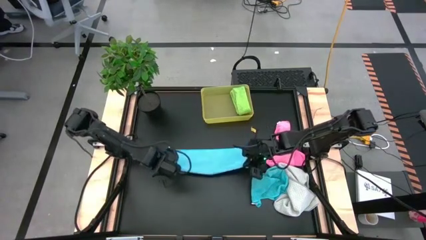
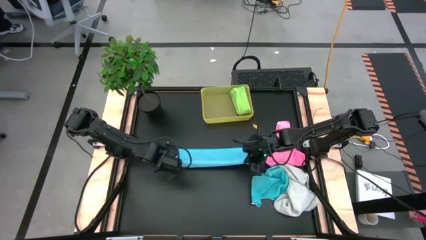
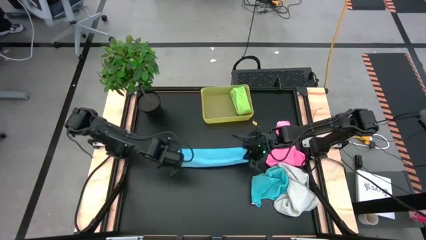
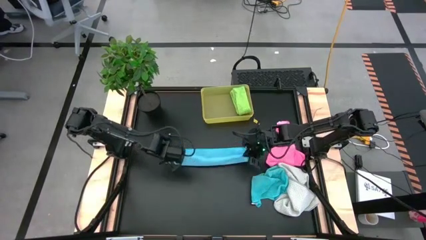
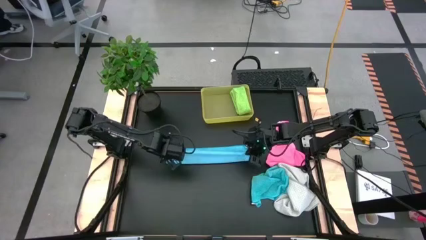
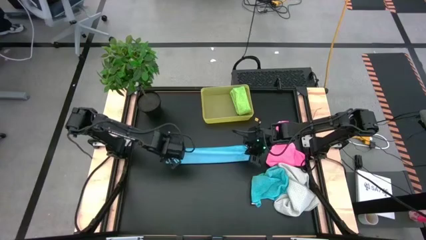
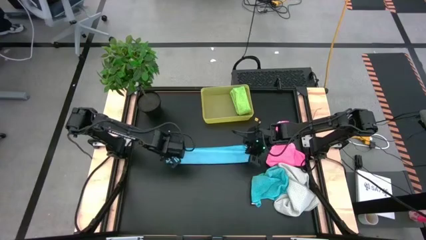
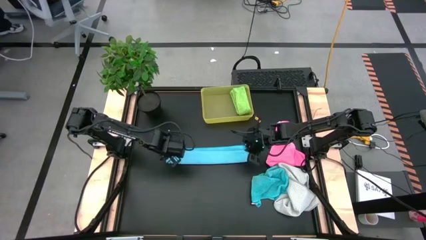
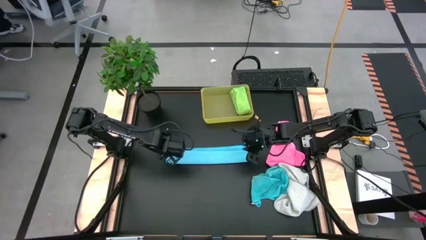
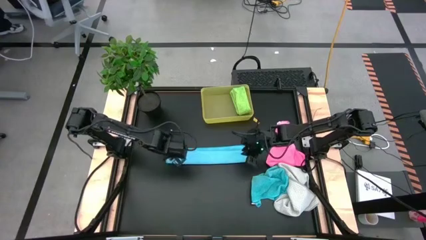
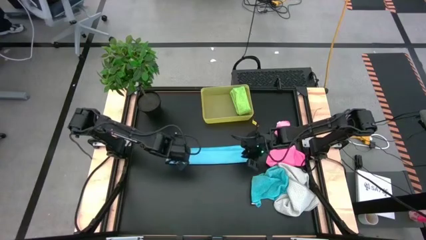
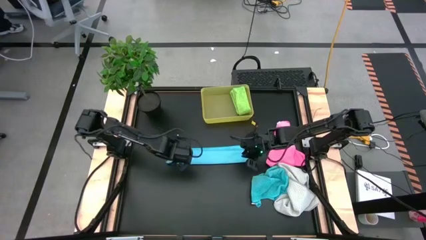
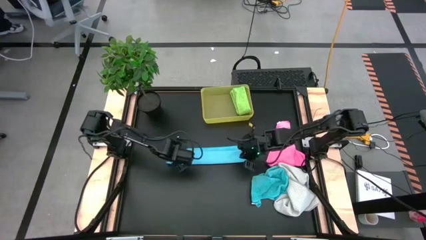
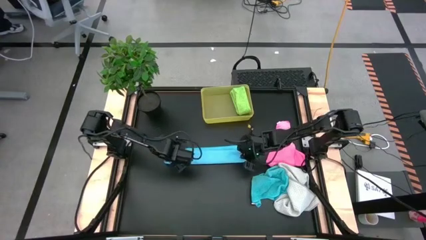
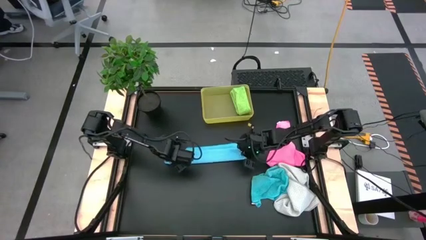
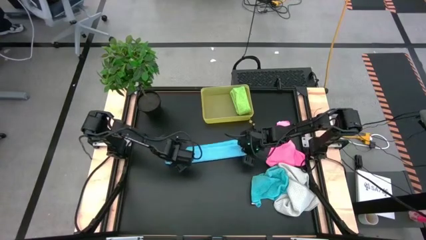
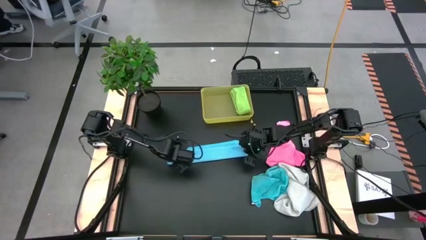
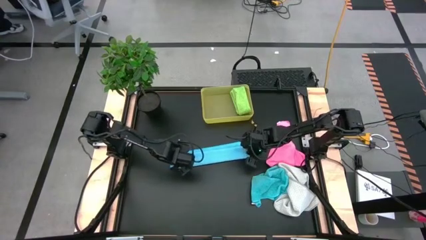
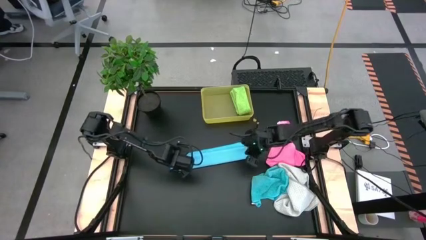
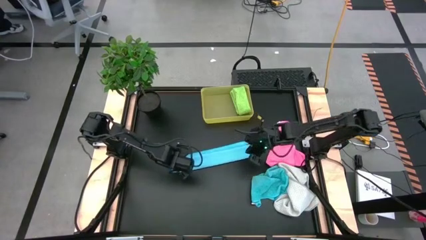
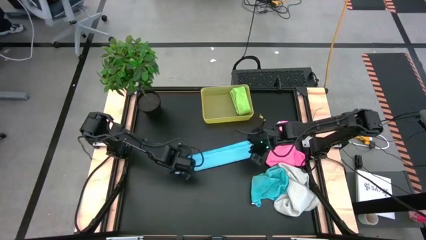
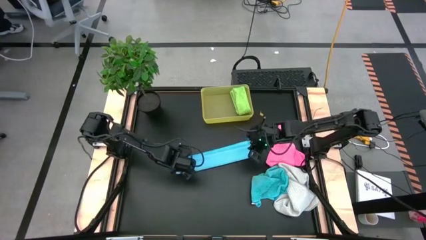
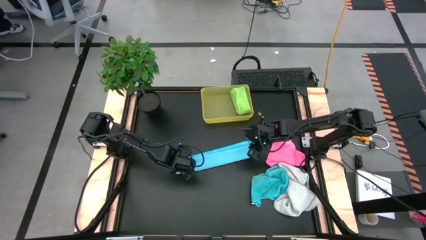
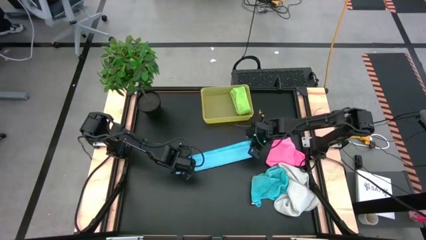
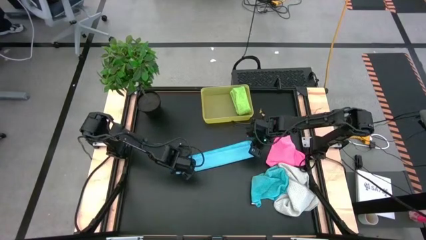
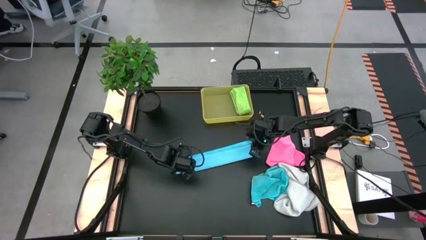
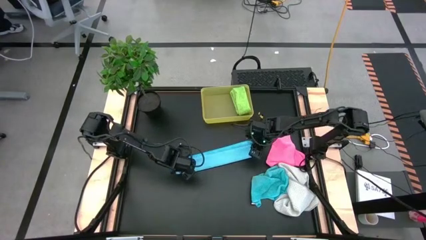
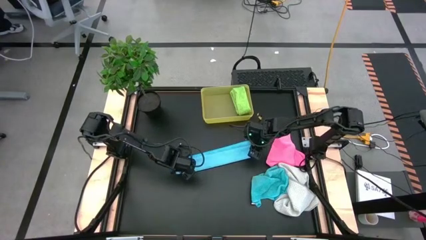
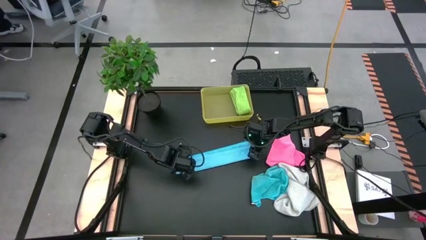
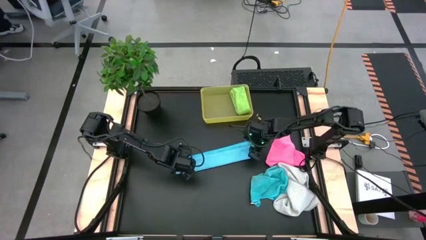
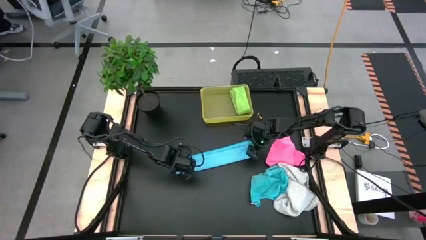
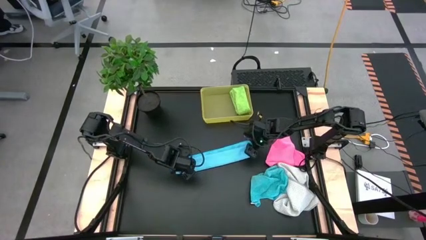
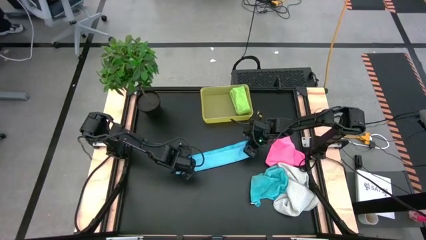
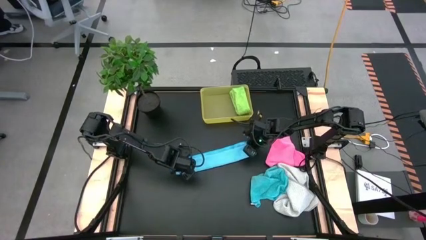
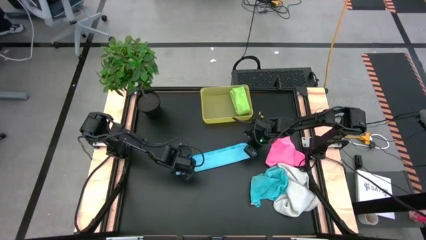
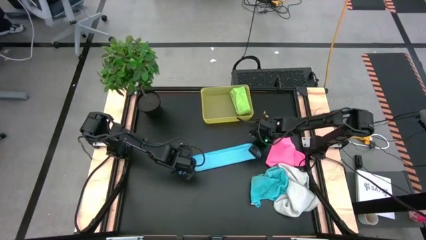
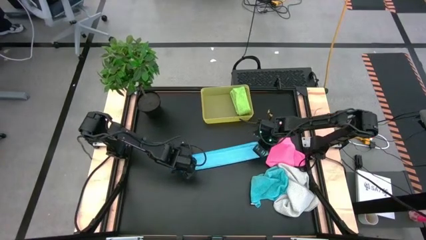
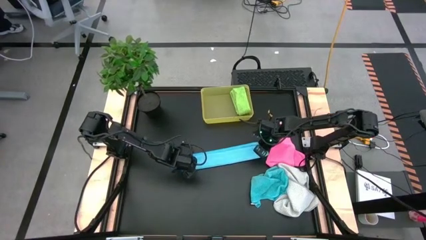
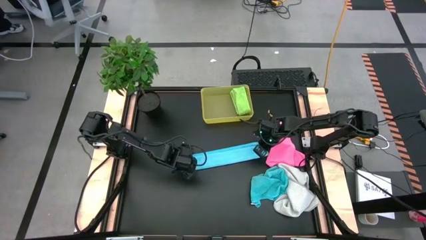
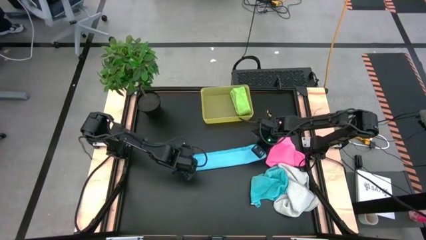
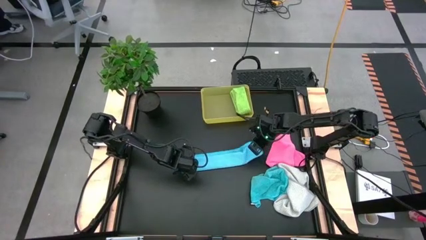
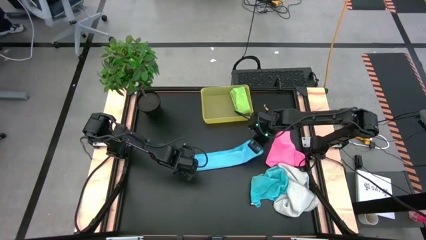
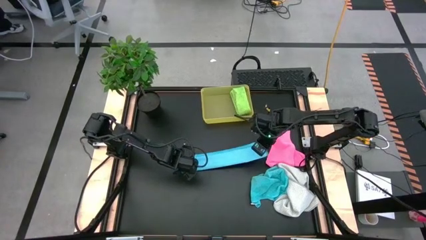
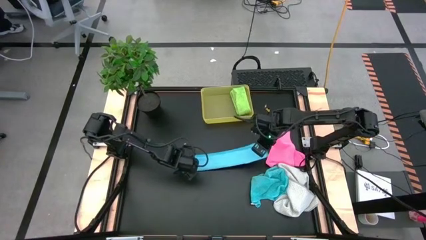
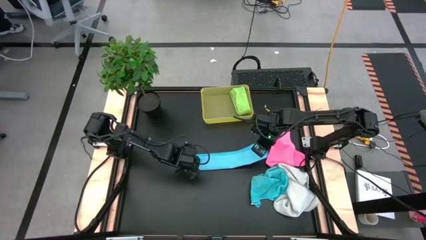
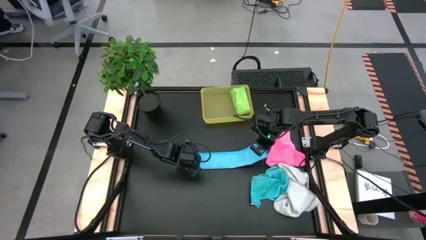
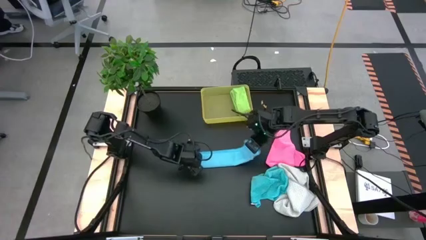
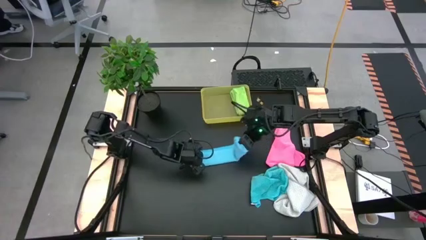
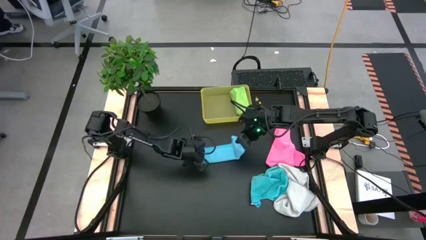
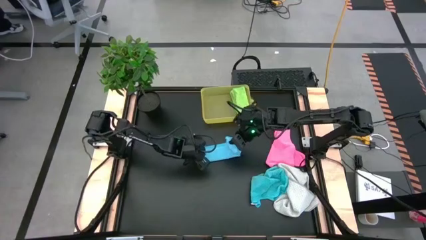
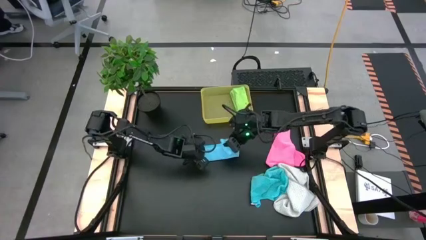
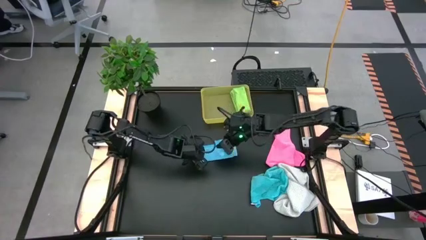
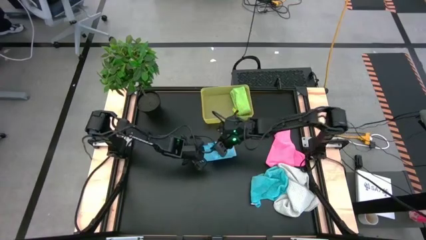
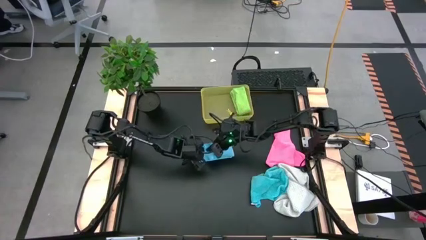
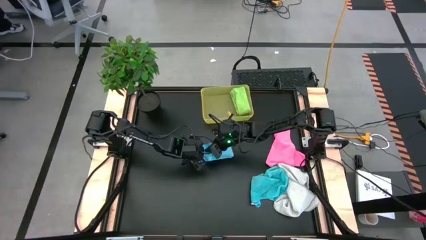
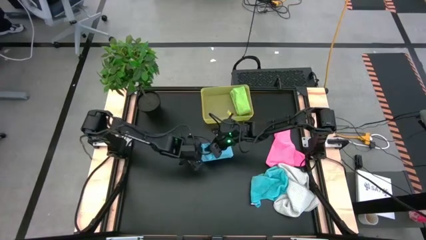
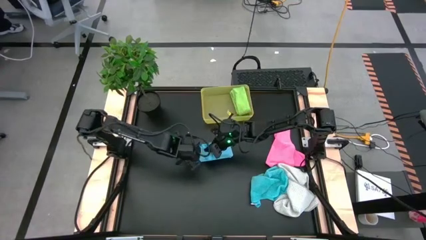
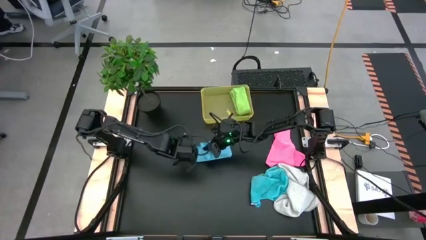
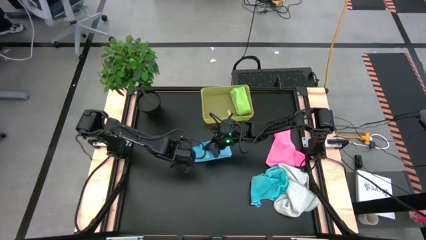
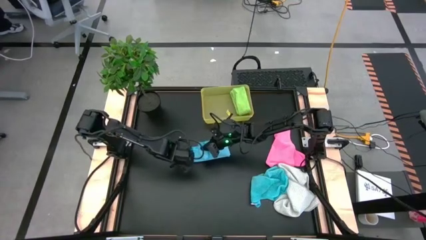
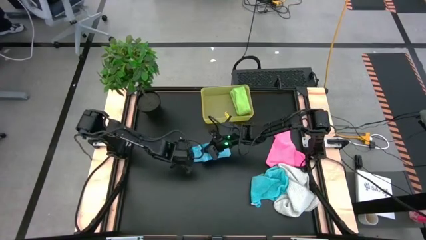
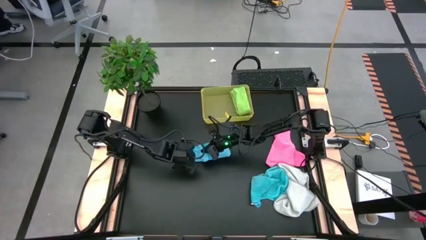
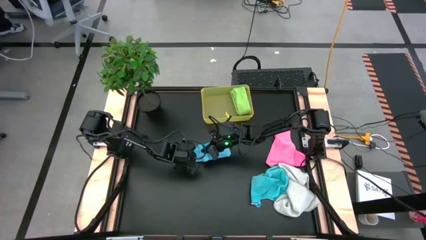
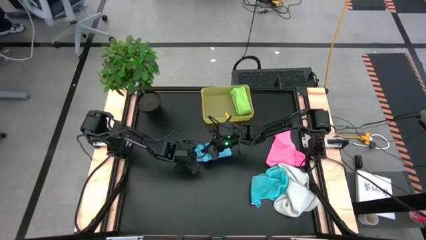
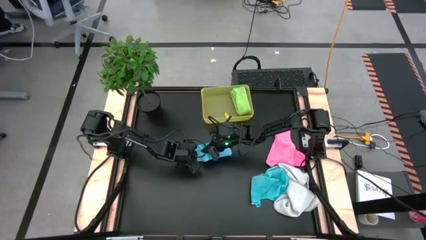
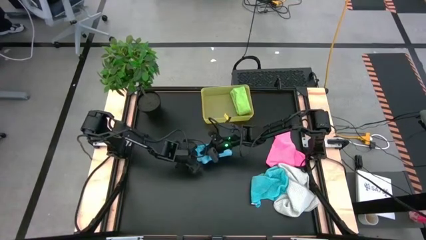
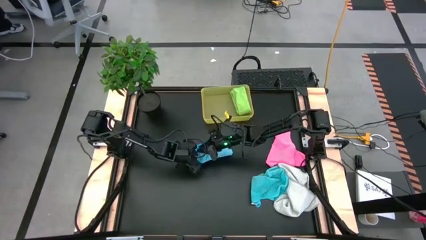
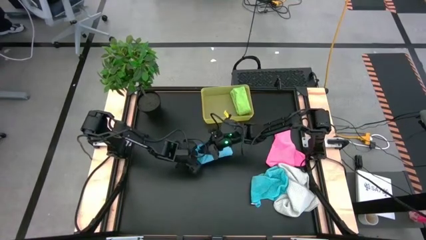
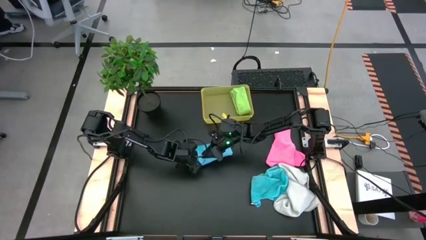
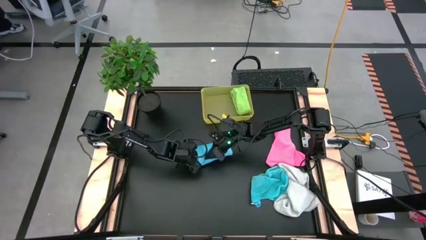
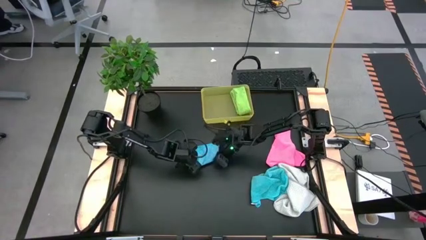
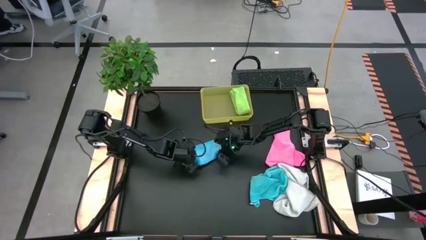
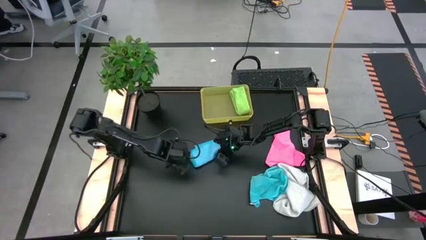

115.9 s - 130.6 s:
Task: Fold microfiber towels
Fold the left blue microfiber cloth
